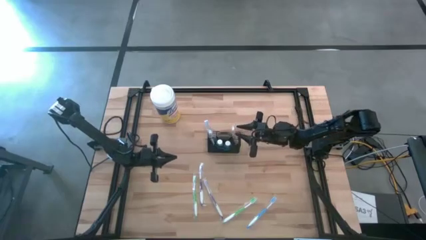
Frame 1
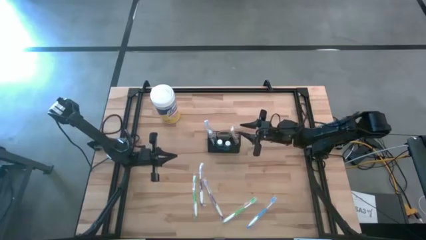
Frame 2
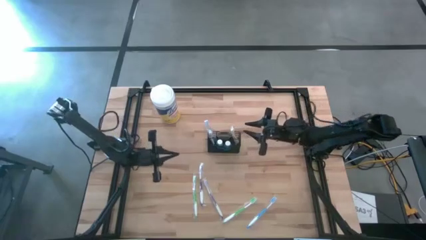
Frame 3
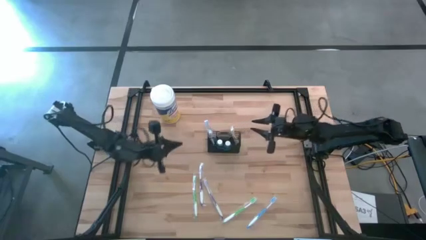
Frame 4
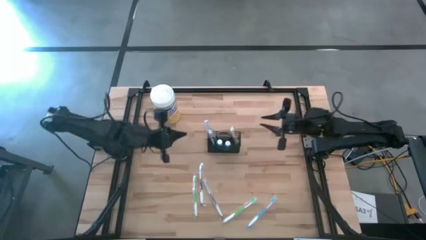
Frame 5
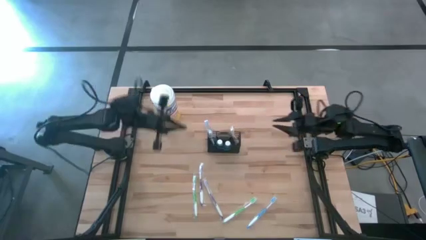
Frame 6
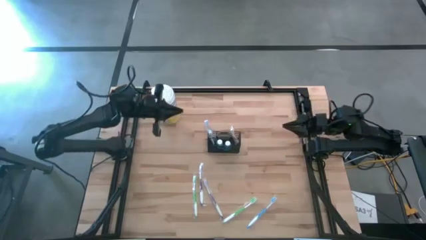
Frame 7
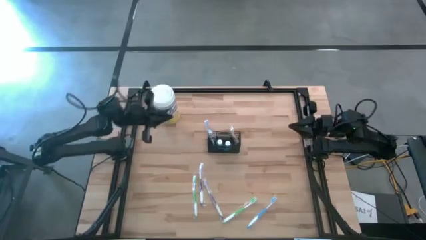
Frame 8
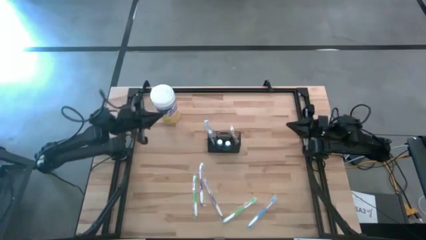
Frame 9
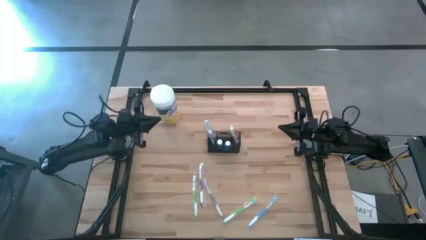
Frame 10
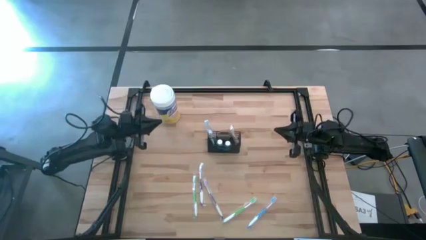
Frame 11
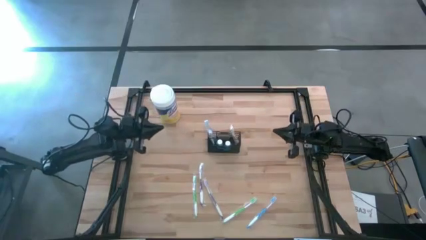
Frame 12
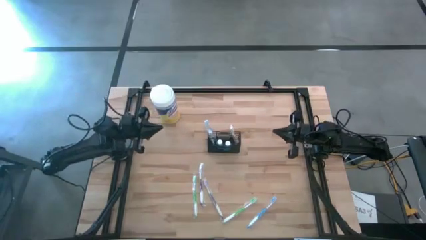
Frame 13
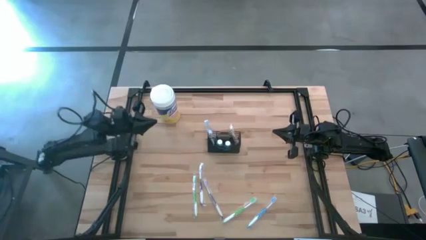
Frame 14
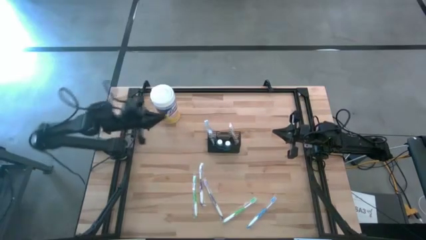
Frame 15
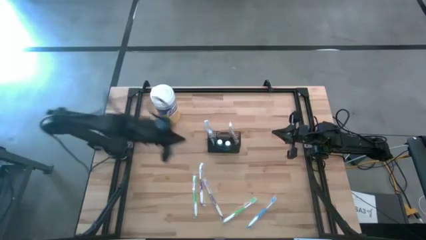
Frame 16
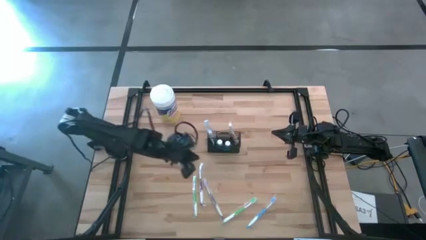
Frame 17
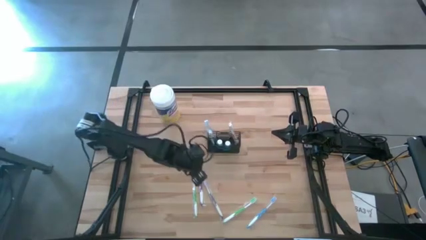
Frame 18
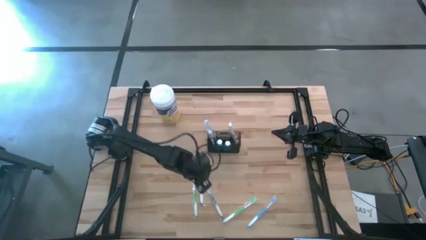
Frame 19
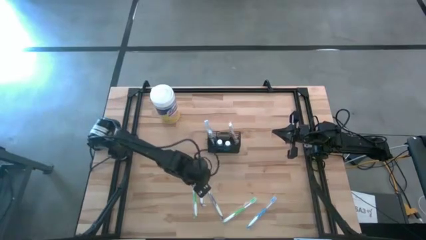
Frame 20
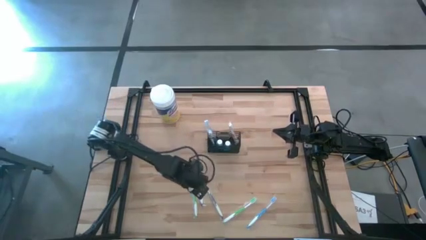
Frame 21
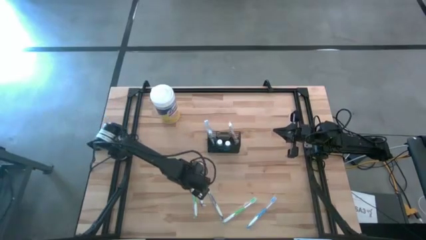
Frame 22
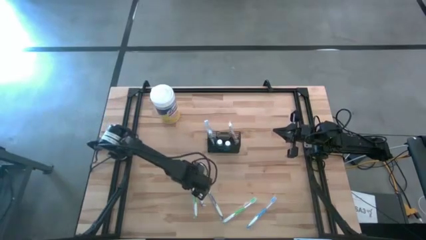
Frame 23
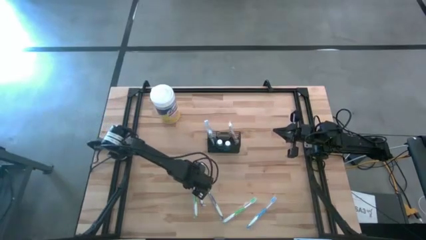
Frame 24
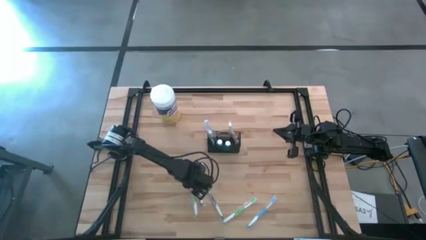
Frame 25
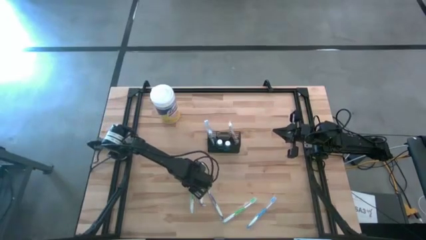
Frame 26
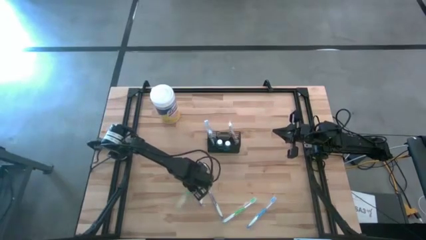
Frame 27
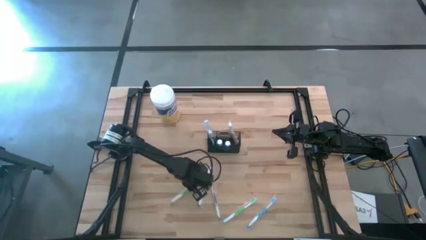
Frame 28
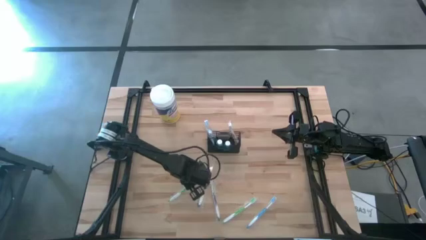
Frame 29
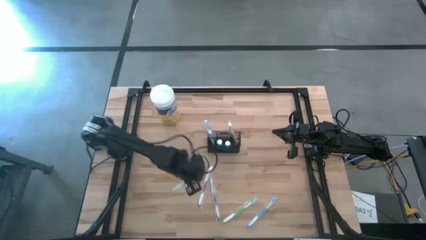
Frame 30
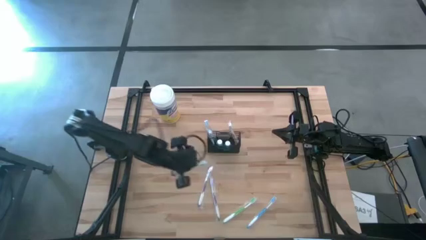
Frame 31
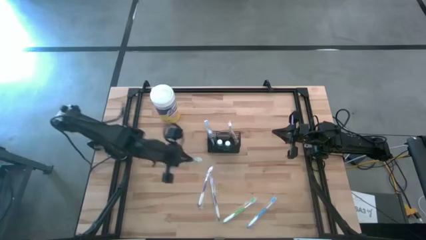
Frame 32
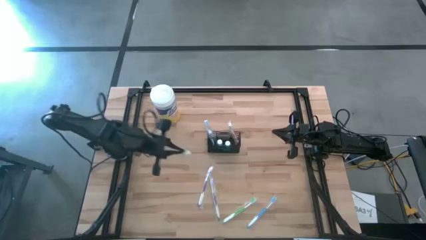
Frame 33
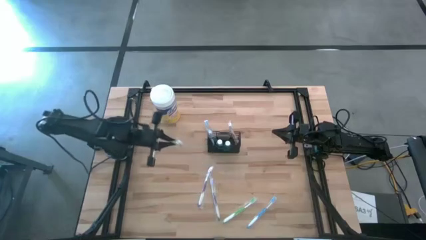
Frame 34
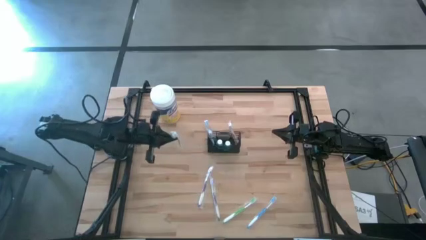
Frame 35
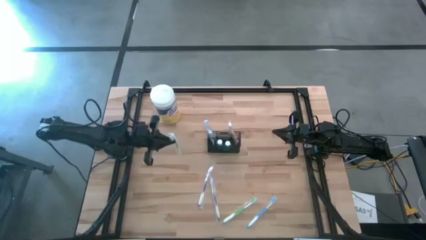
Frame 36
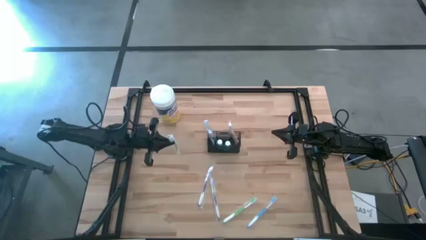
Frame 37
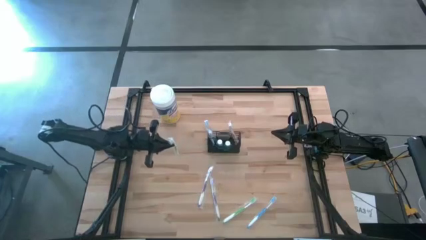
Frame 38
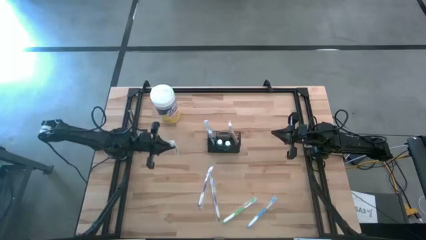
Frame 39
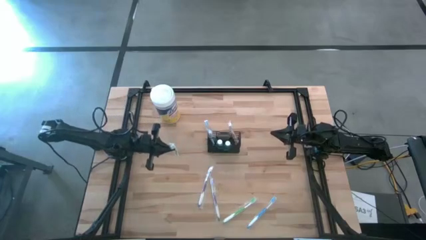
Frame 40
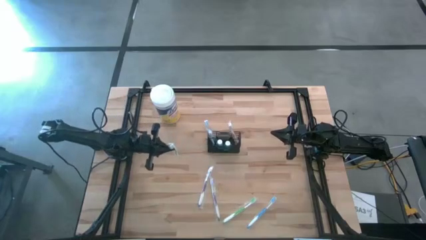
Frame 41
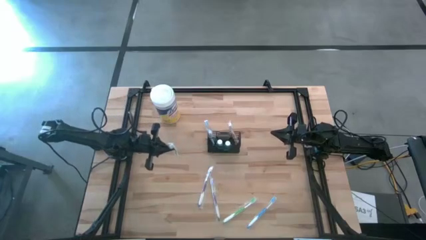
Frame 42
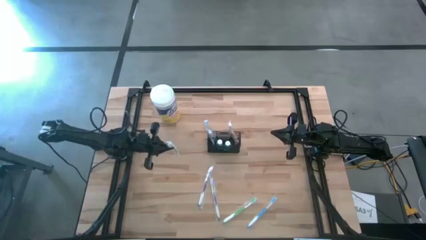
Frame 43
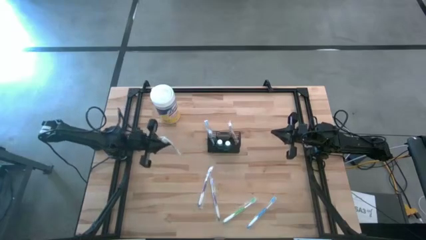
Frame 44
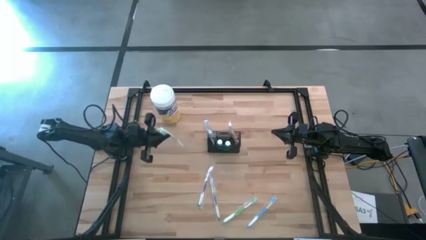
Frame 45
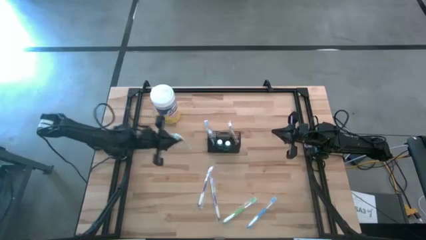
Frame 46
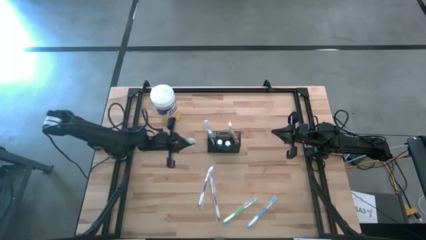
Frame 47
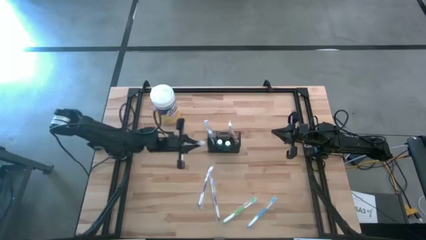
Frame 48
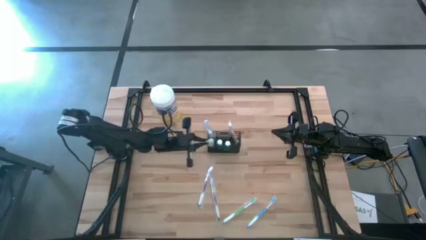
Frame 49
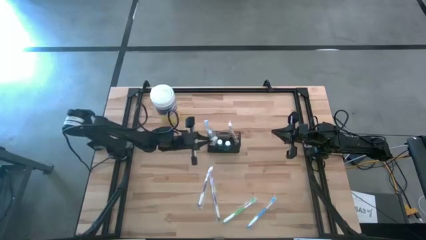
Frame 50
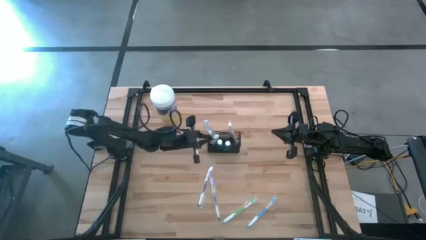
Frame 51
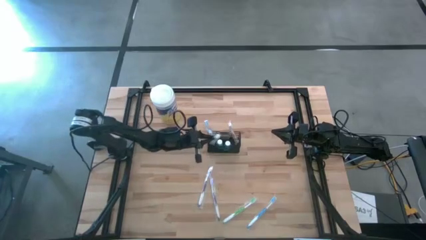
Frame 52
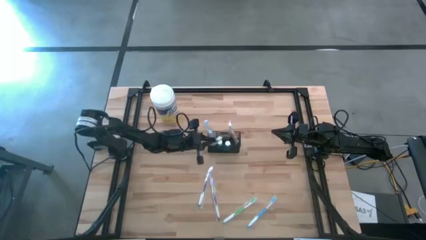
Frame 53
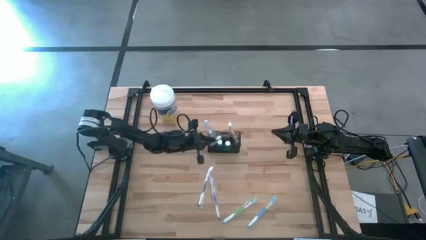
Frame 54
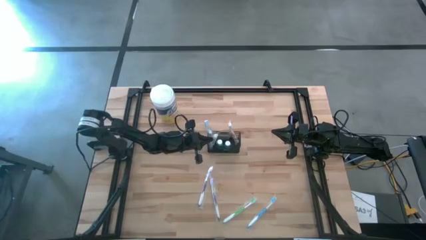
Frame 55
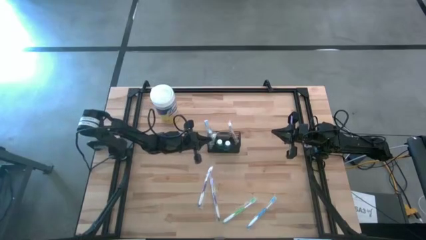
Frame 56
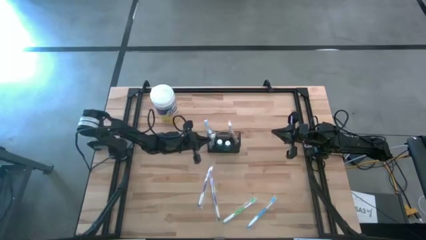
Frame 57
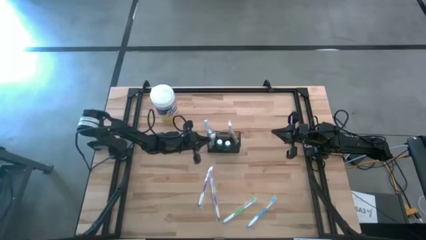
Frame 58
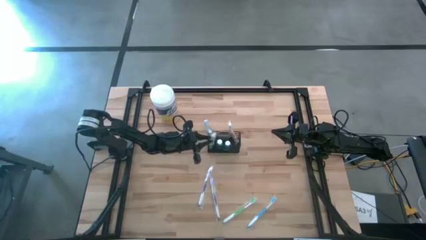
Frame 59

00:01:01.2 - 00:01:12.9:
Task: Pick & Place toothbrushing station
Put the left green toothbrush into the black mesh organizer
